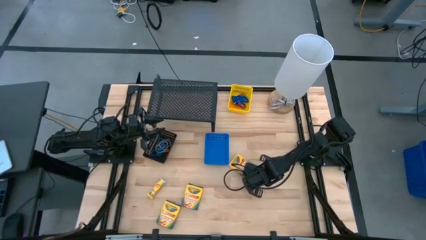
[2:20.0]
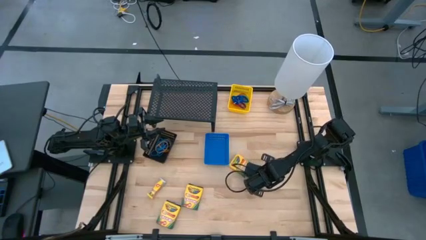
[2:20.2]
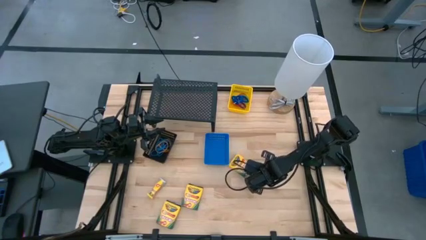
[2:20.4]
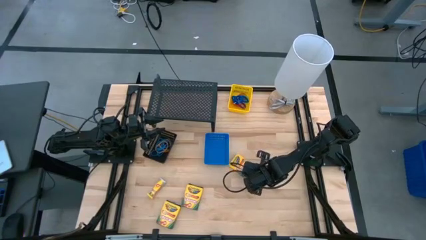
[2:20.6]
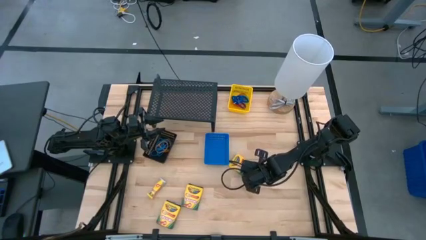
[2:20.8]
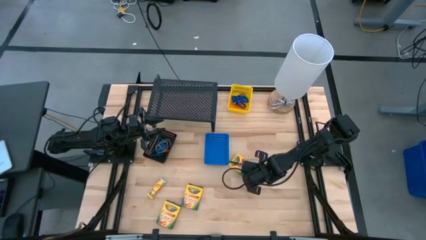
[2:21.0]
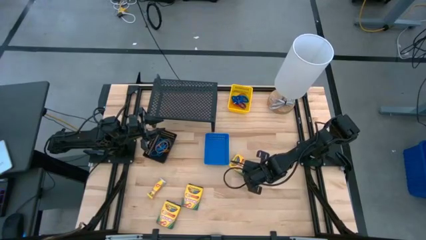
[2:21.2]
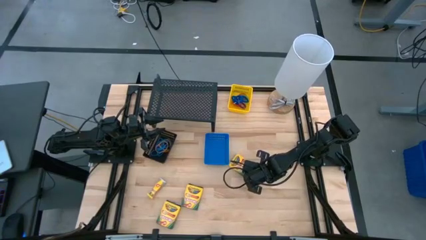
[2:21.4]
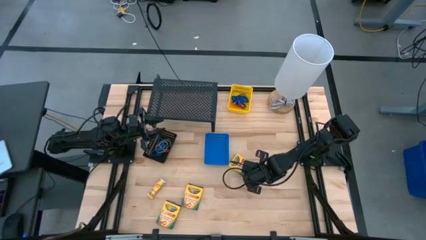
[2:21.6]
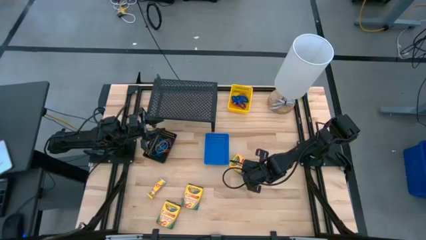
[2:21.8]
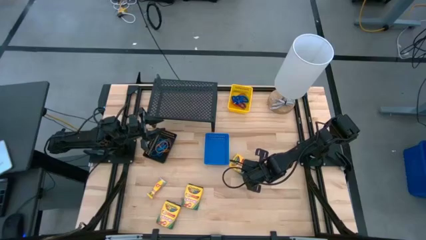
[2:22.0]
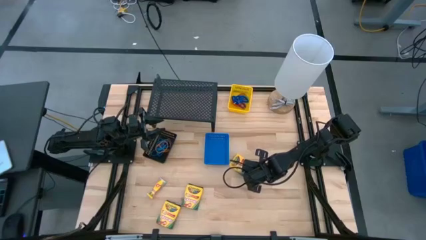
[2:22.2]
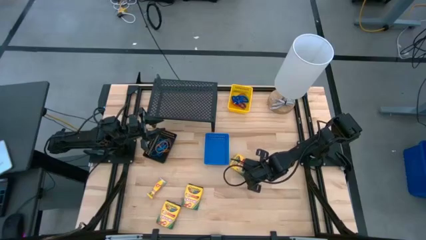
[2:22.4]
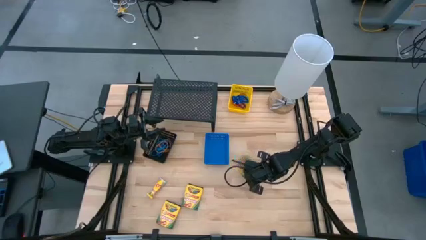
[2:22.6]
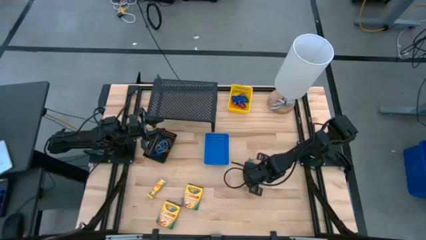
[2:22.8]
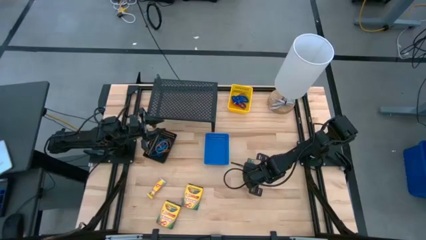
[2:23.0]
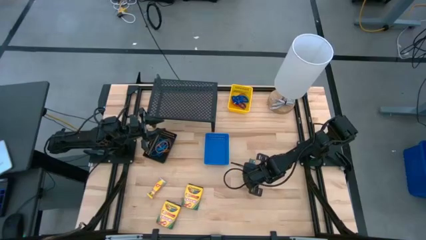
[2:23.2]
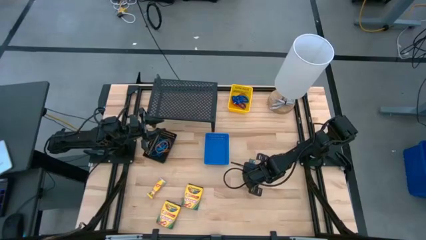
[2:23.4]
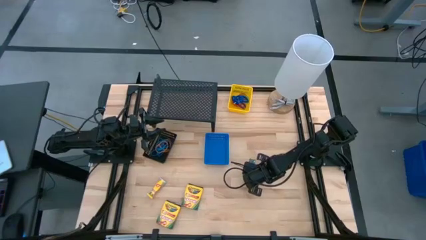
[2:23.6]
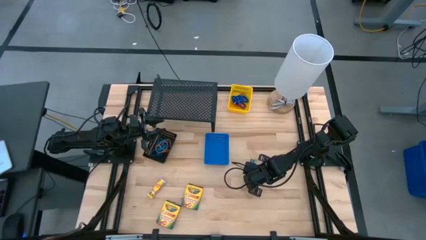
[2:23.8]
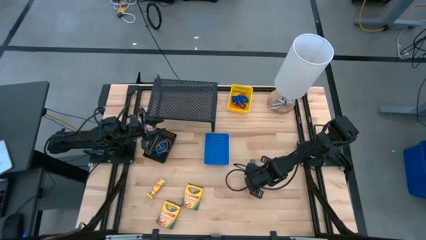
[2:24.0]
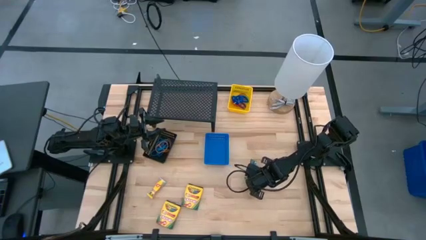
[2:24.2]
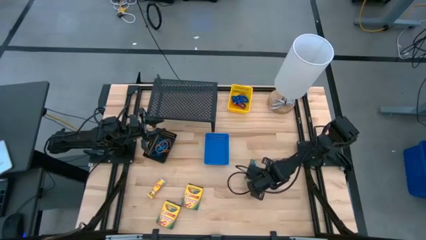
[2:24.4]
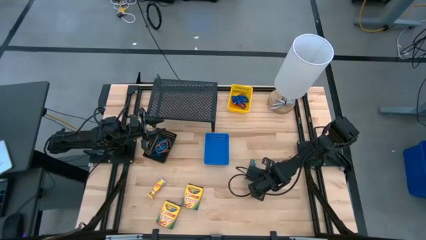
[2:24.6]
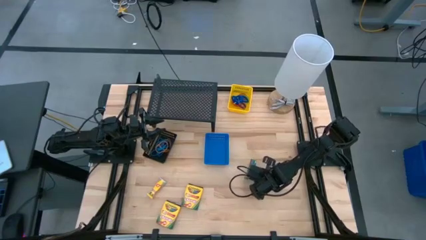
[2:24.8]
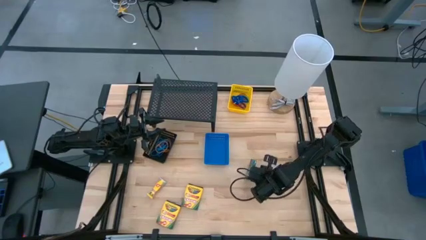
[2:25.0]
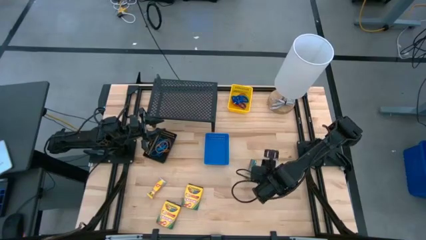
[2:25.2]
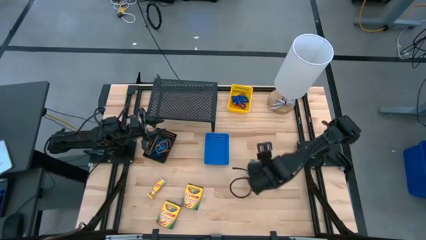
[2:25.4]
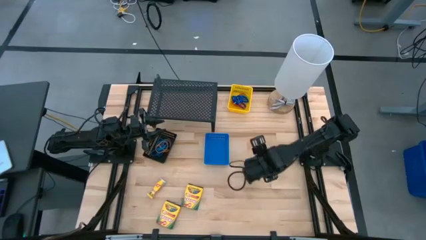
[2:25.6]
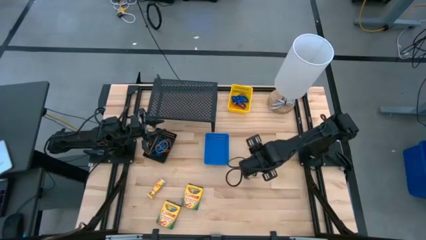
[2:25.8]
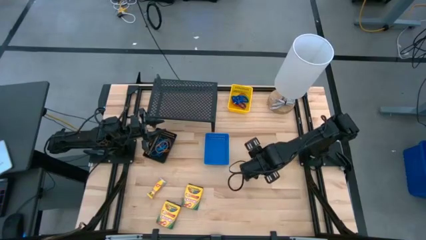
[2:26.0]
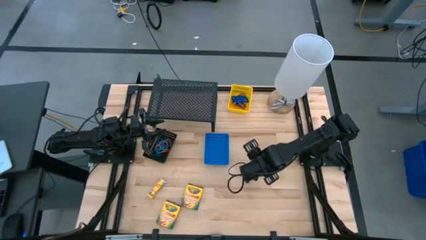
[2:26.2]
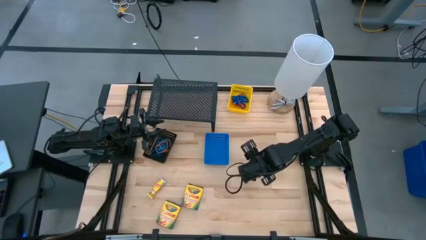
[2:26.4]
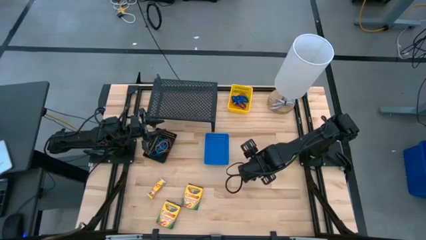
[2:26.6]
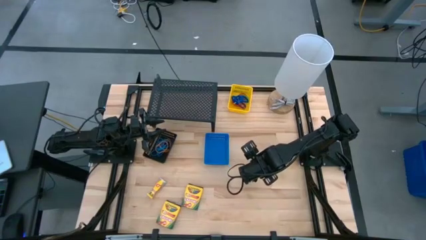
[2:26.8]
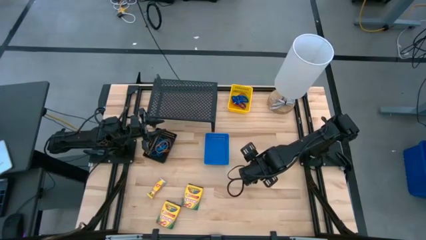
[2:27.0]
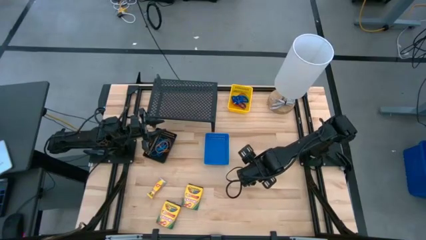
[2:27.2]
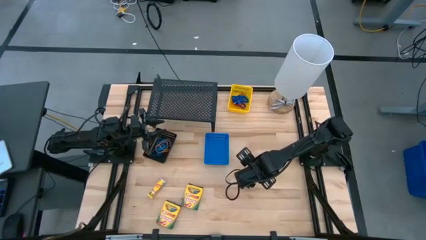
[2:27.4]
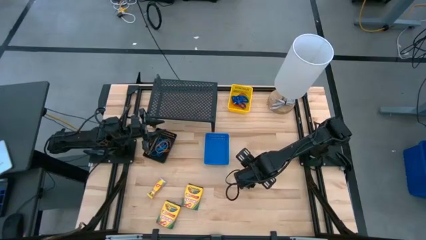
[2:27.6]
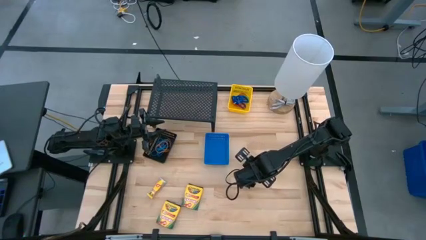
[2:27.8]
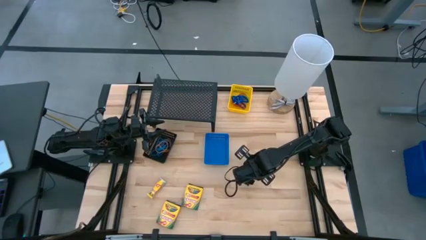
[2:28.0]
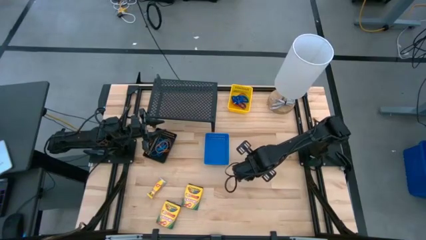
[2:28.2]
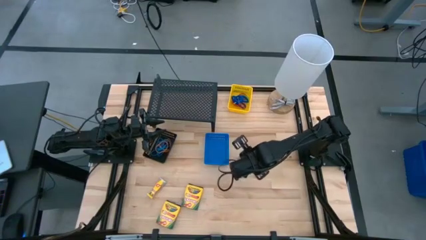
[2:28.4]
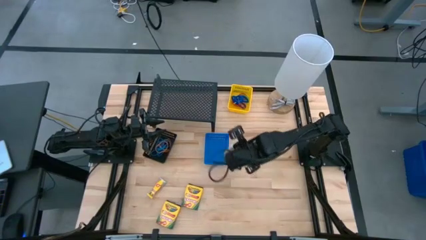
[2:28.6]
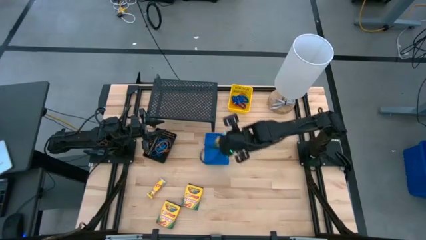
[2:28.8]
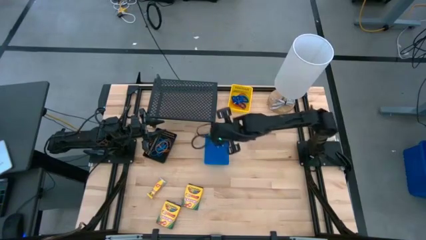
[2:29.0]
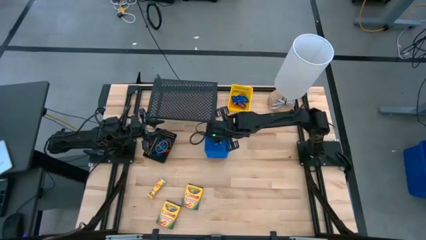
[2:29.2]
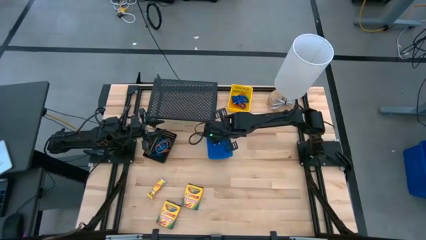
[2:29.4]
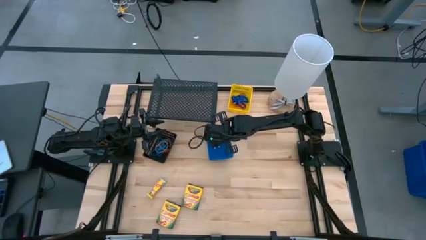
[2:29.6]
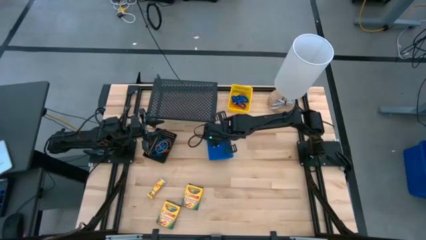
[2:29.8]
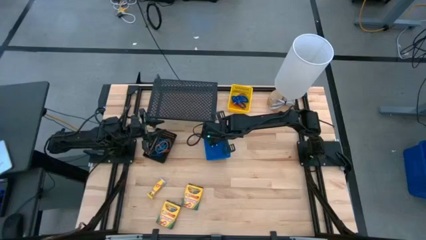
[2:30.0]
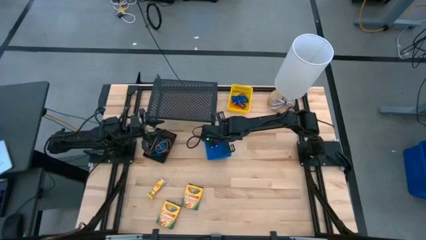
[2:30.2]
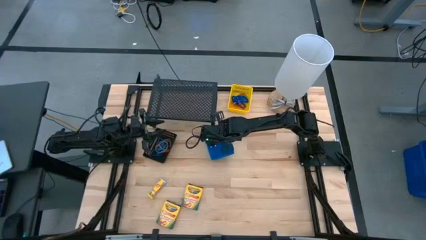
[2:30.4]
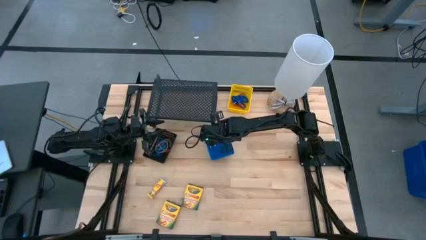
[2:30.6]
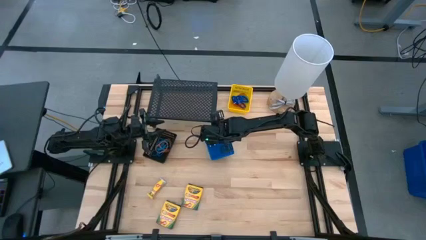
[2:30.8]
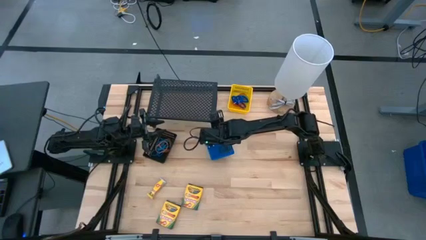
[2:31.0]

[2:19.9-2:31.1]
Task: Pick & Place Office Desk Supplies
Put the top large yellow crayon box into the blue bin

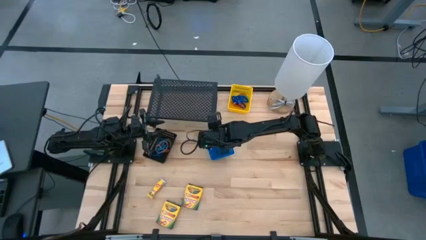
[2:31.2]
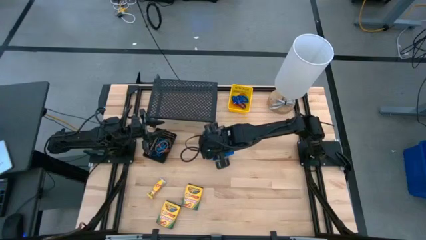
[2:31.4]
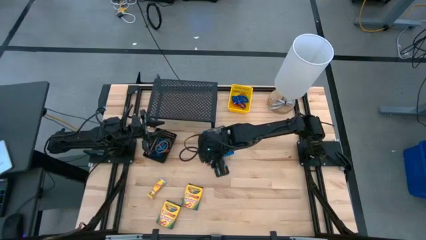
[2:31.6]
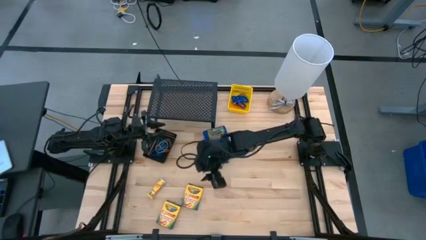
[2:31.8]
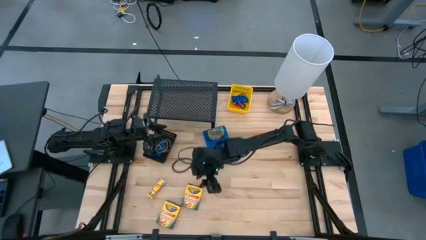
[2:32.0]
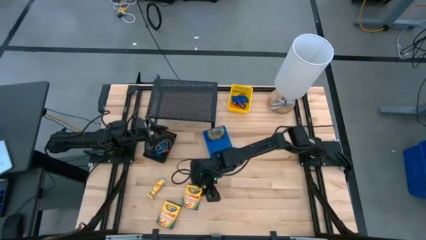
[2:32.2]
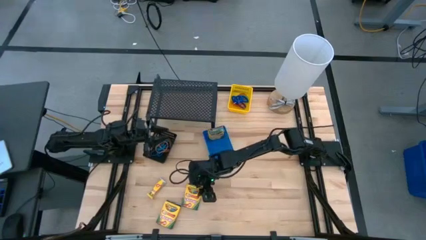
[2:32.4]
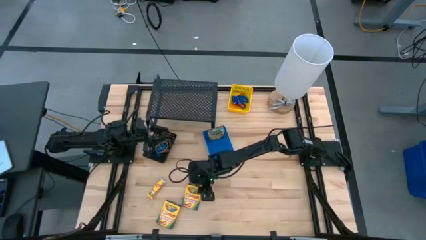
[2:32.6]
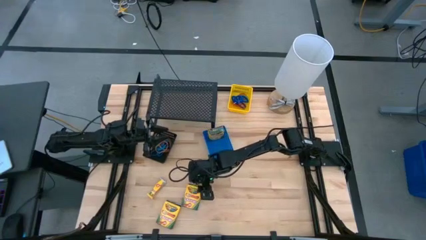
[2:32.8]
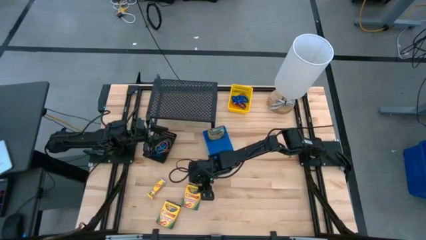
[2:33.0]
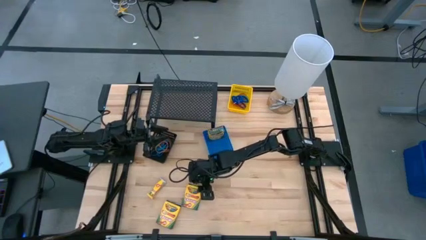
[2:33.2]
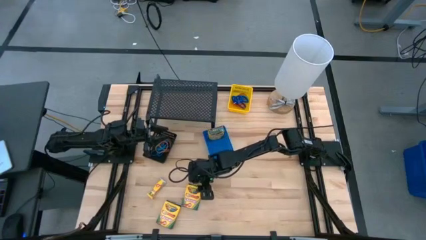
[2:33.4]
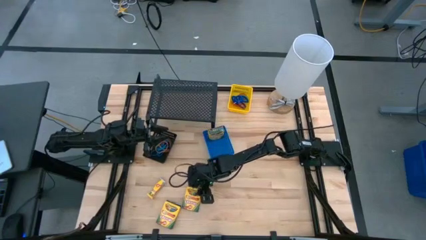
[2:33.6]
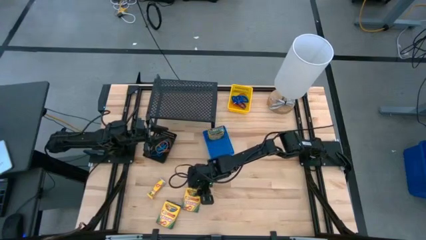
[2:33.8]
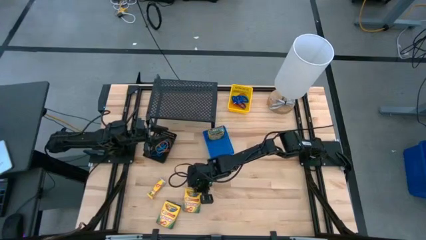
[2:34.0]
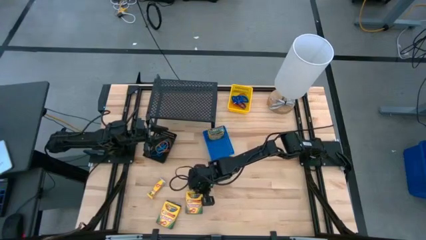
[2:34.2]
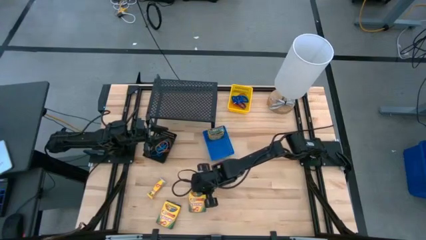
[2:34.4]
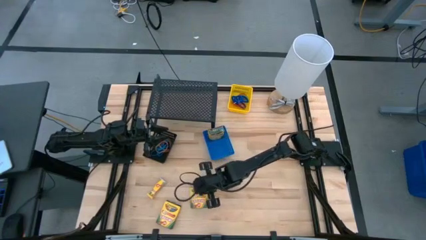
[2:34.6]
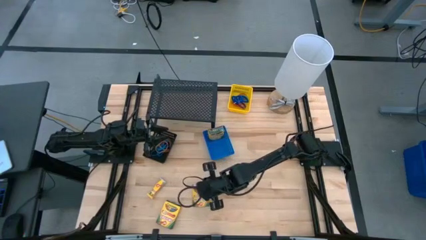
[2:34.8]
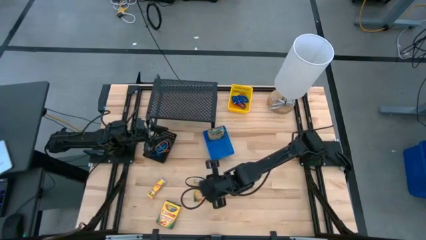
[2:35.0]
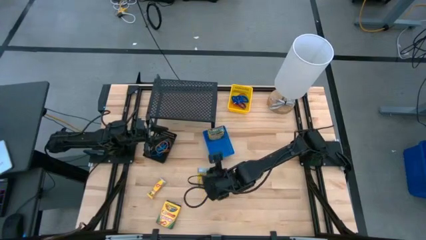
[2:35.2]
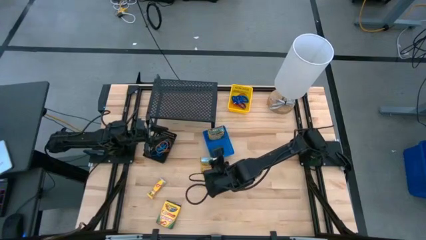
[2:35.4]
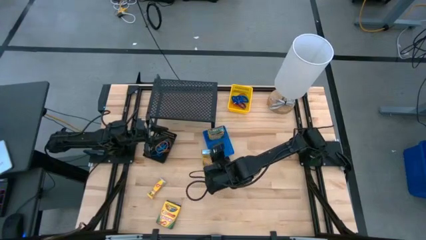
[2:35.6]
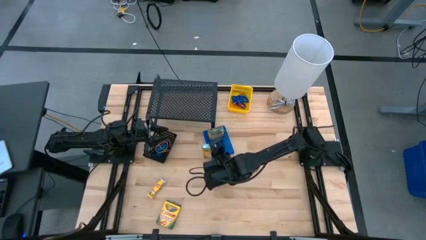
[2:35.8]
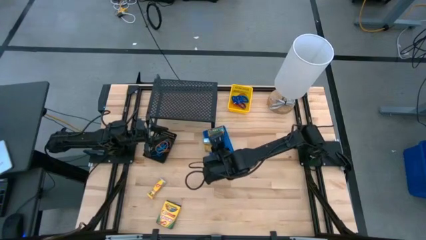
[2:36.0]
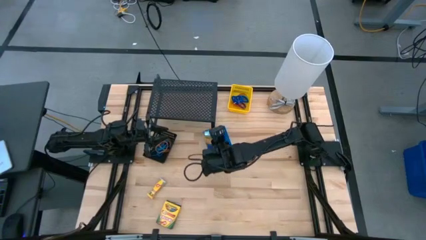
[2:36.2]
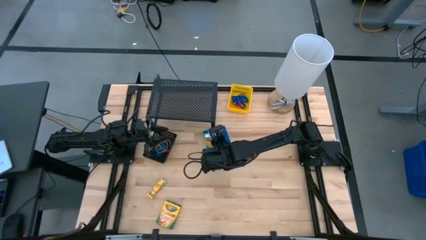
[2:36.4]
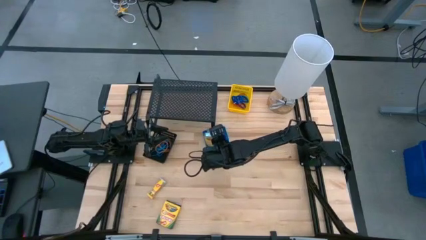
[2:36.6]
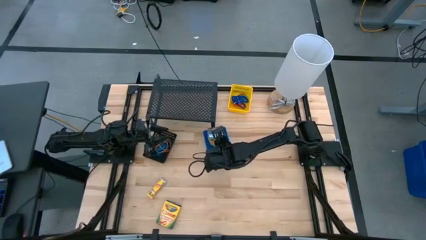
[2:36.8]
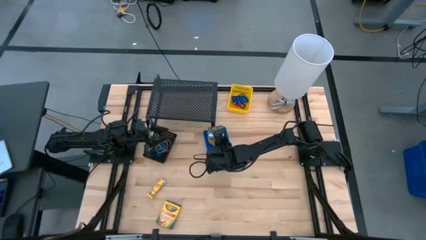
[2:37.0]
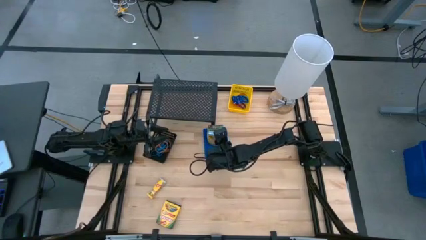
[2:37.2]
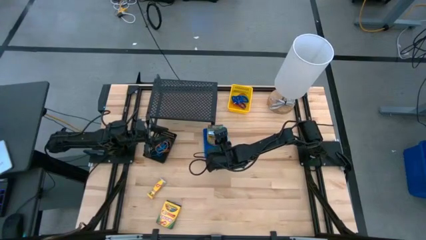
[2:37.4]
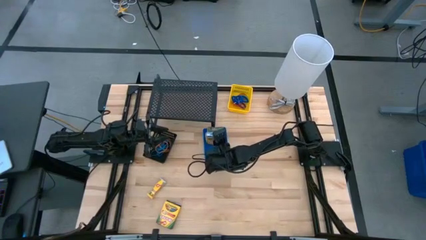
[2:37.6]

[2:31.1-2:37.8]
Put the top large yellow crayon box into the blue bin
